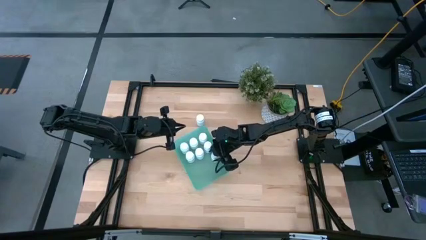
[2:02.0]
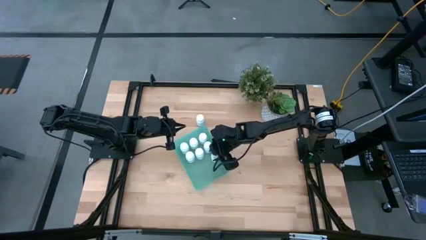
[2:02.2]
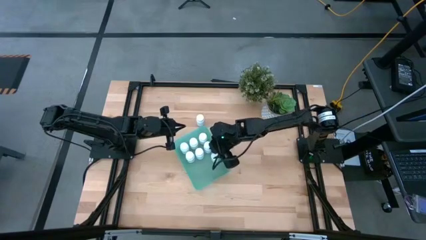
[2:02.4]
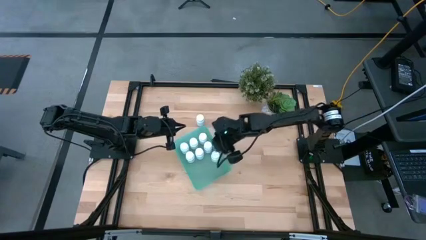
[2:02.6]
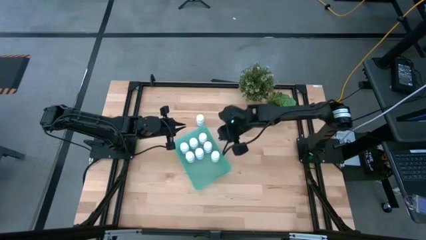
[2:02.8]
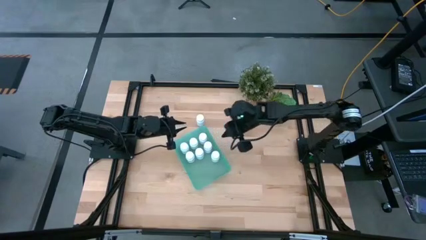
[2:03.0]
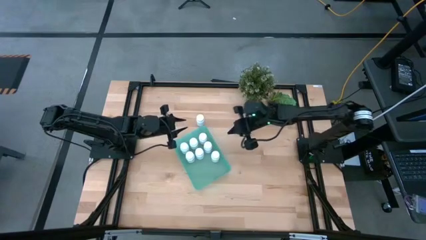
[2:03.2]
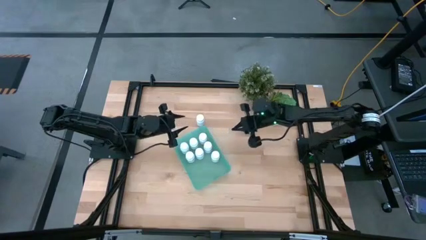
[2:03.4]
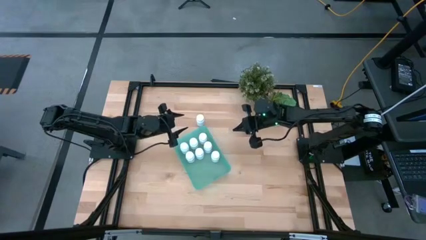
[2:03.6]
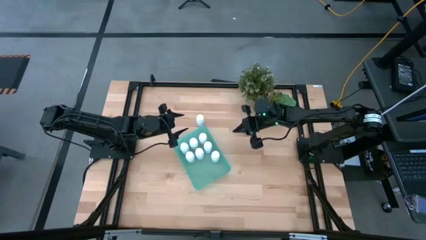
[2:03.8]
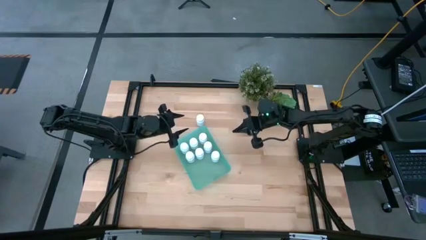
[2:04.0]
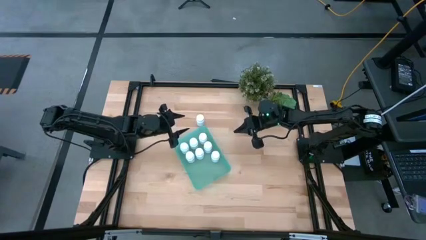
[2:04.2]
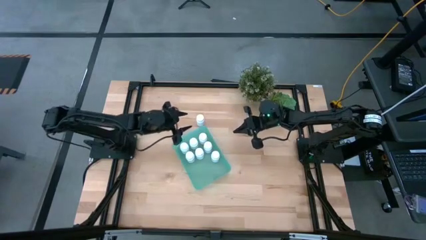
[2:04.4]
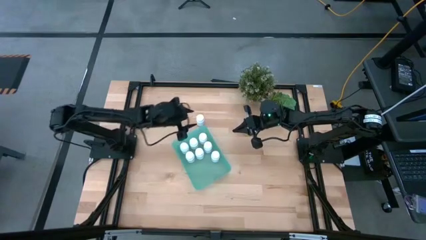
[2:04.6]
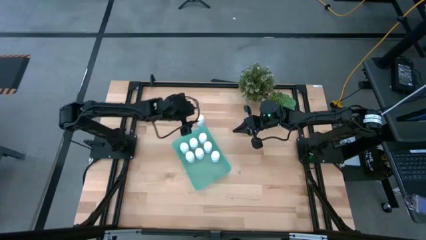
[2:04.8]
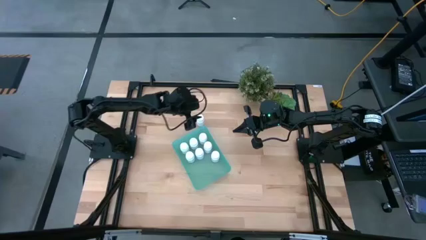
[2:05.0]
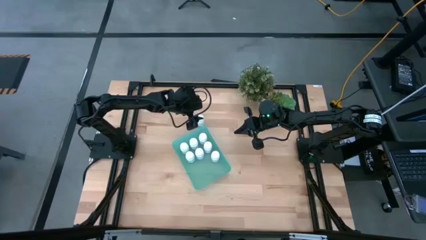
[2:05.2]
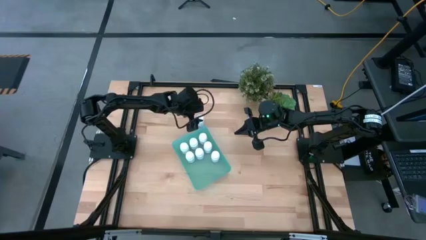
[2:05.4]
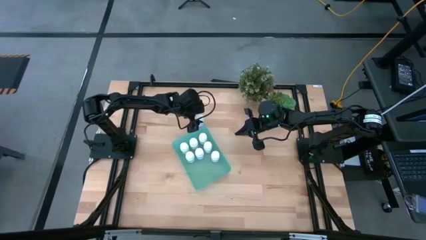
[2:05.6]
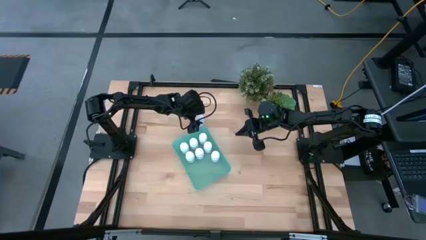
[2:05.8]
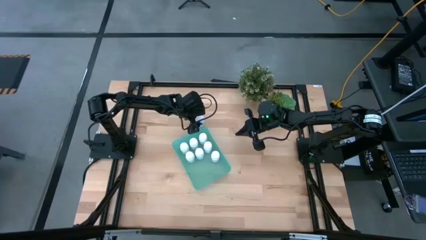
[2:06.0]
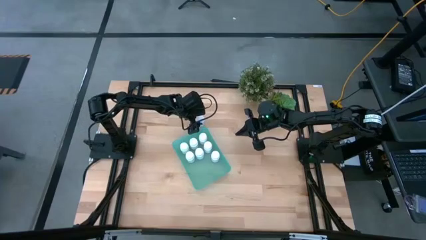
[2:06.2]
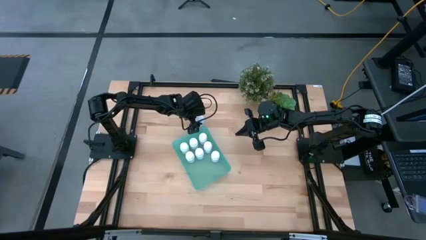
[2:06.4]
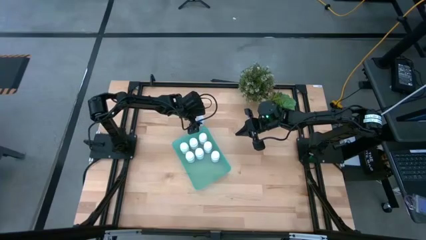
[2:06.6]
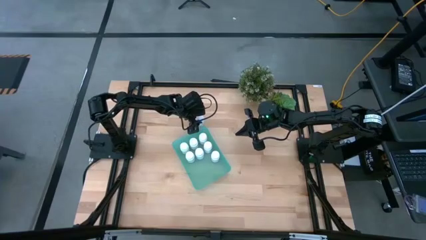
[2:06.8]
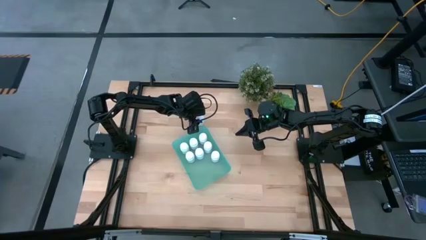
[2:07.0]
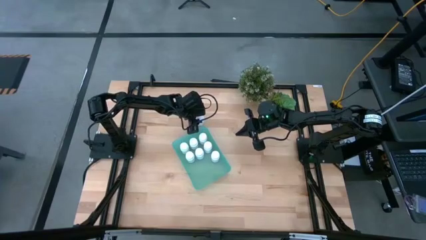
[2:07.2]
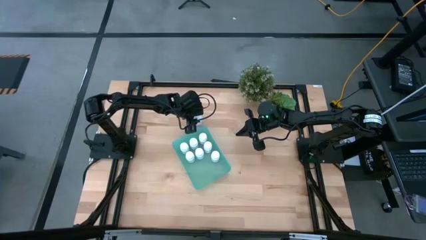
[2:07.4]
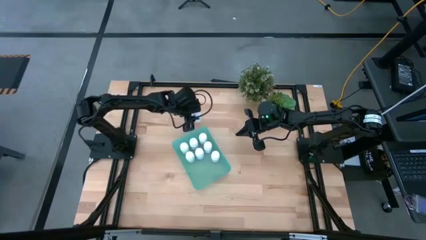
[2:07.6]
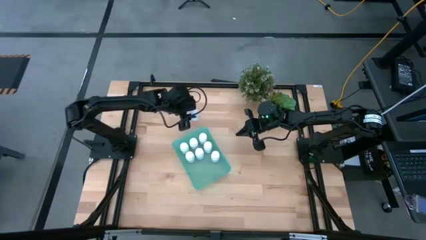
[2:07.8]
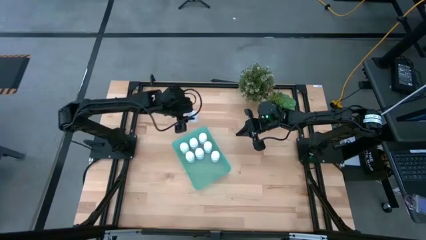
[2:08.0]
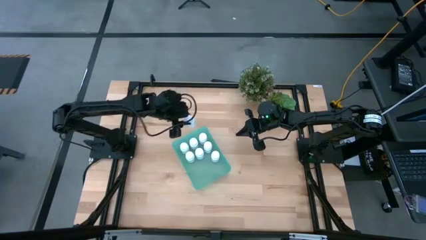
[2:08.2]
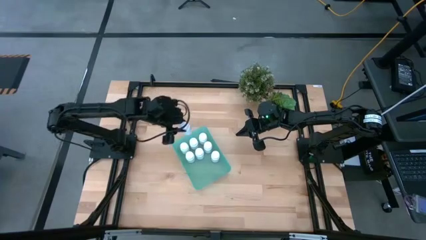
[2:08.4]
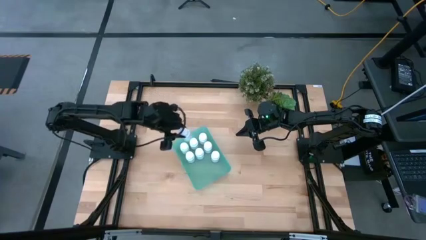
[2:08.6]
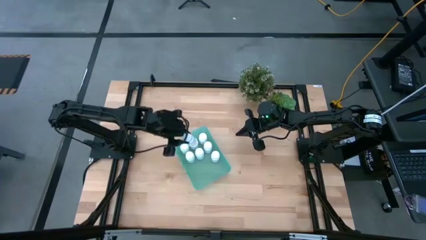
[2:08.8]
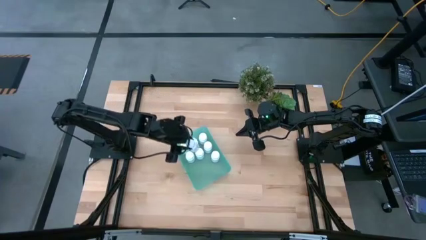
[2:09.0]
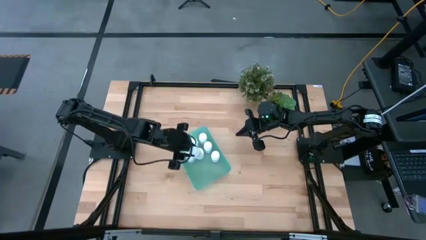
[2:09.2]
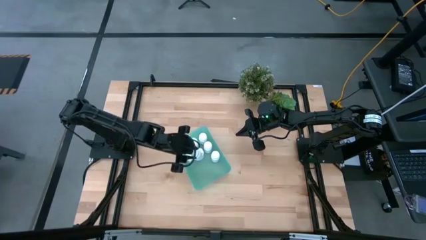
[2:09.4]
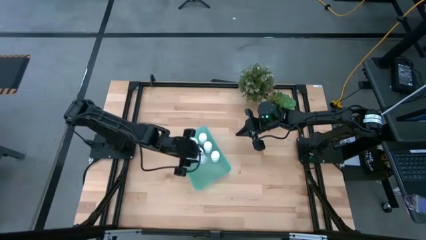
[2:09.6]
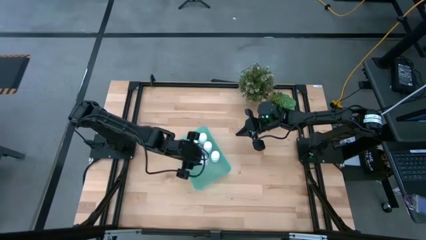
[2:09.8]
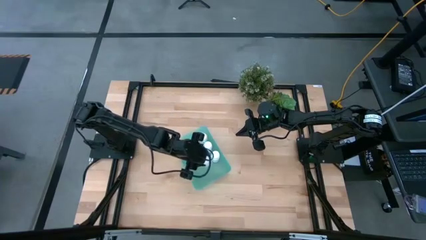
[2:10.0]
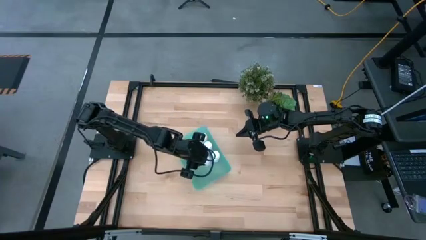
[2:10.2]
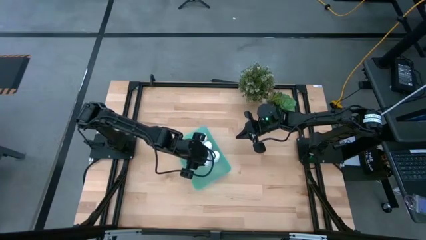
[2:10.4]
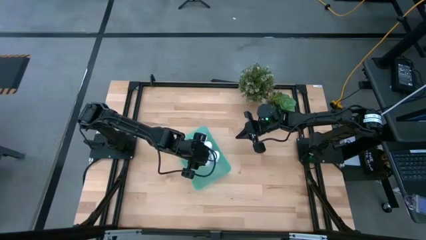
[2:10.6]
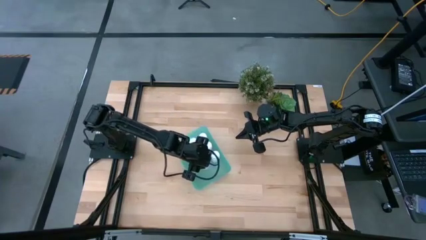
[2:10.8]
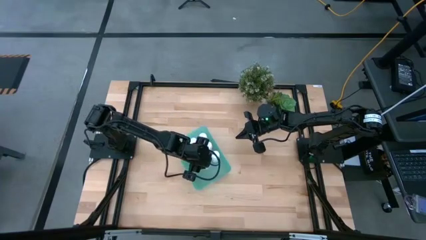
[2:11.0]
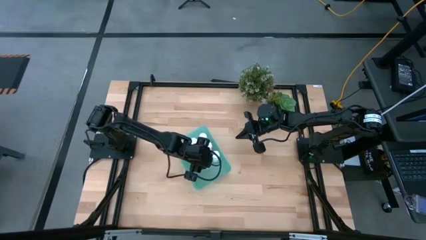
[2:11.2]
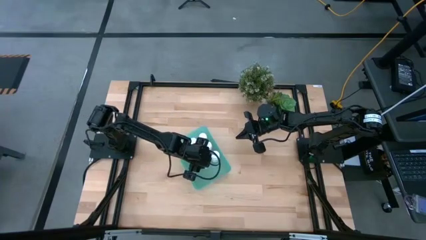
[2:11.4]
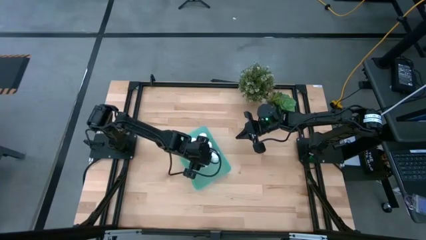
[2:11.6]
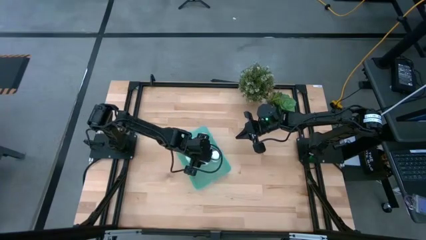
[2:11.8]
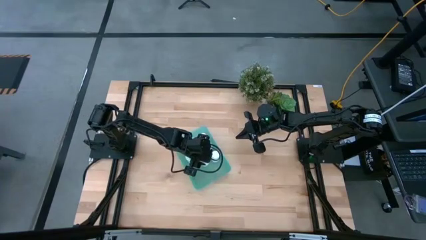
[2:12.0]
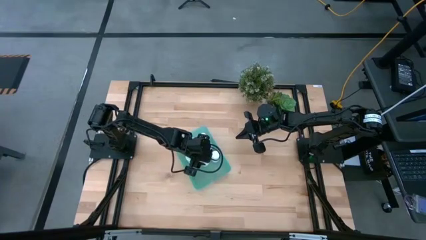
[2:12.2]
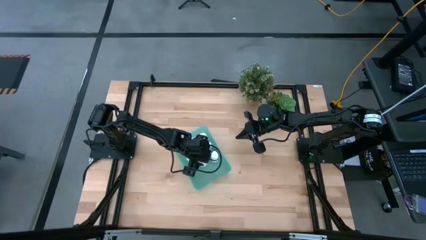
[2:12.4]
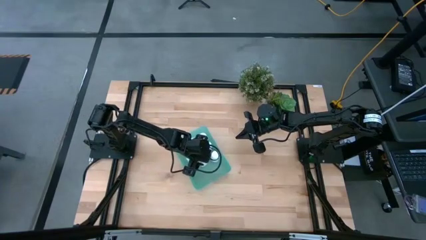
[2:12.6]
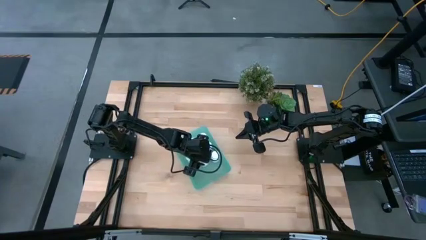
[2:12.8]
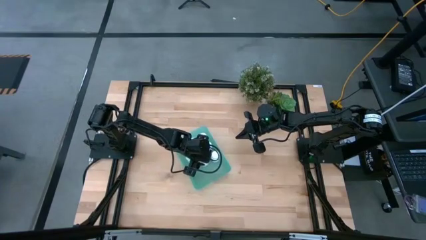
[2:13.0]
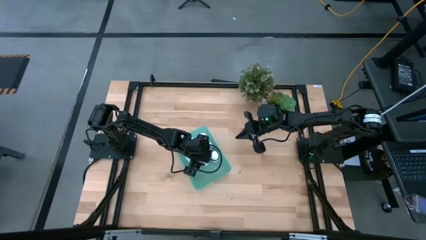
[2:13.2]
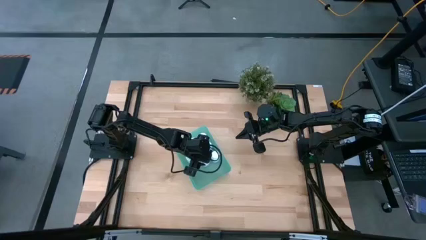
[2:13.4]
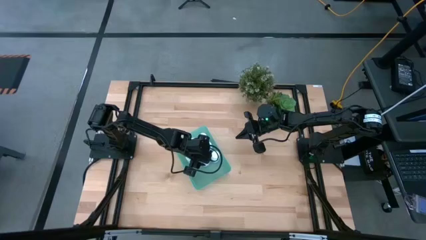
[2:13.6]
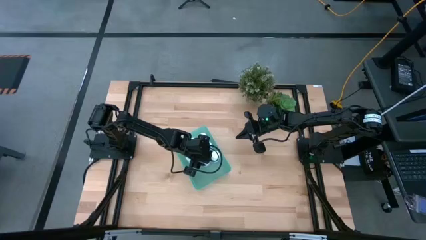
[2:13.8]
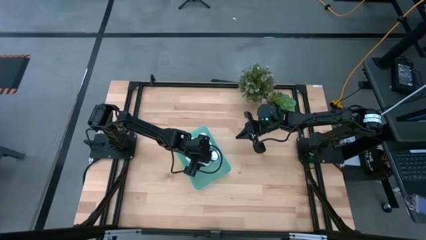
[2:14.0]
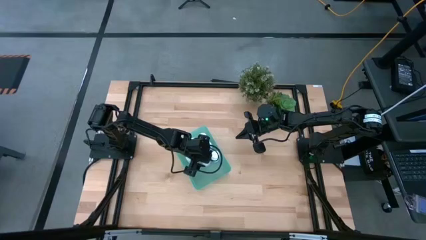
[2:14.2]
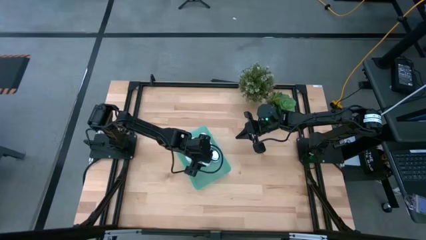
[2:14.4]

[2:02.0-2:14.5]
Task: Pick and place pill bottles into a basket
Put the white medicine bottle into the green bin

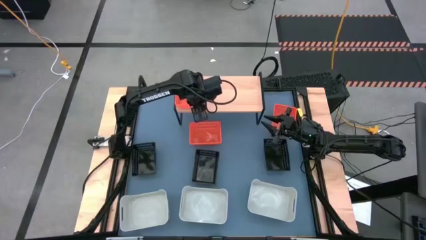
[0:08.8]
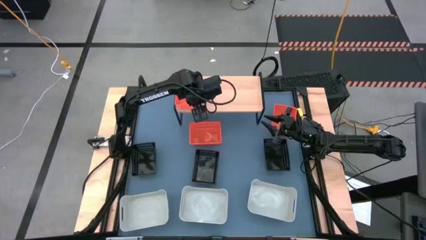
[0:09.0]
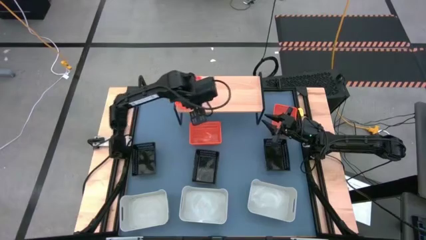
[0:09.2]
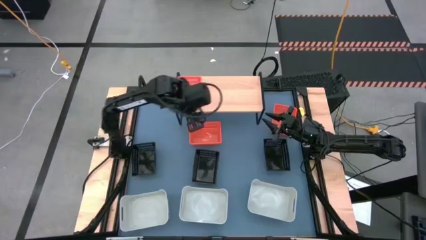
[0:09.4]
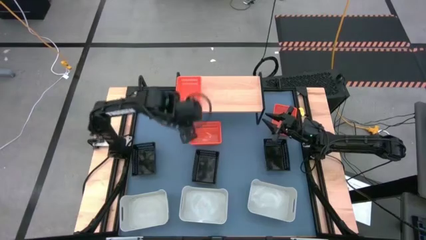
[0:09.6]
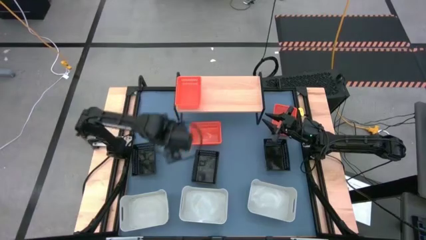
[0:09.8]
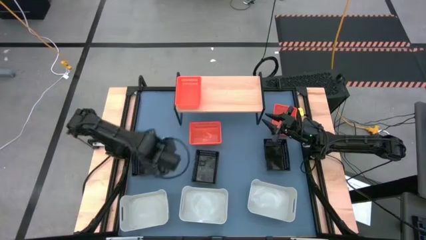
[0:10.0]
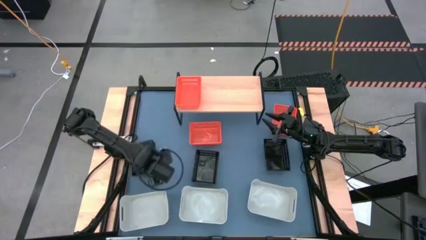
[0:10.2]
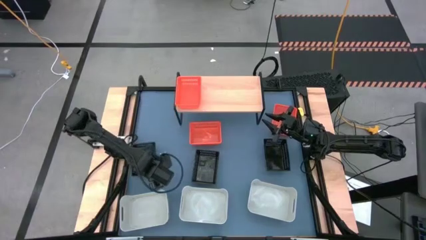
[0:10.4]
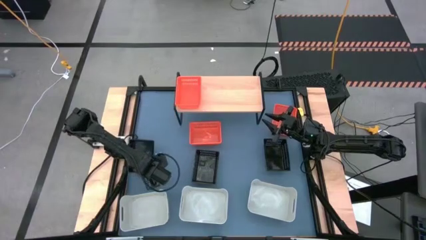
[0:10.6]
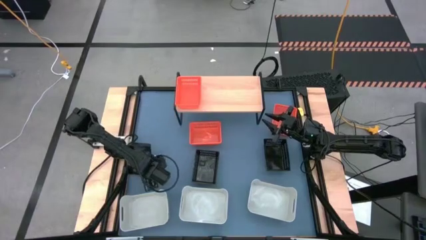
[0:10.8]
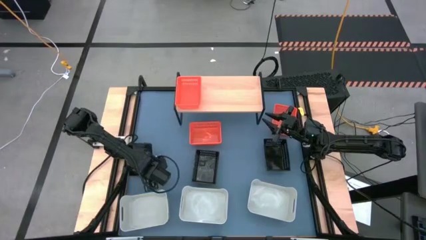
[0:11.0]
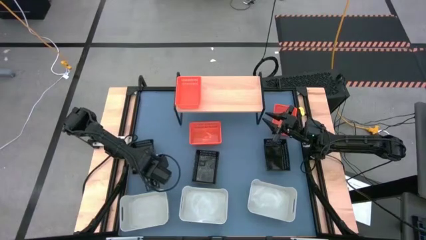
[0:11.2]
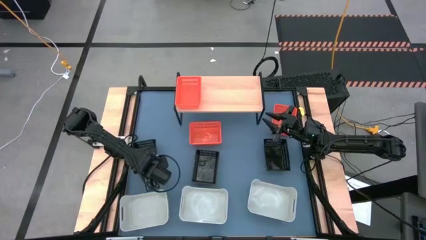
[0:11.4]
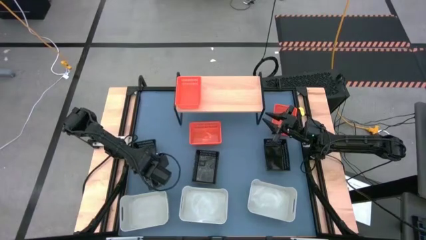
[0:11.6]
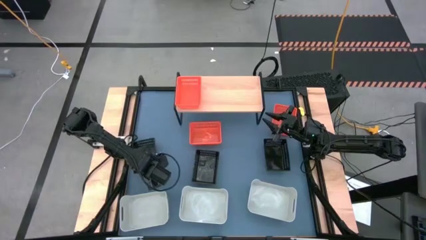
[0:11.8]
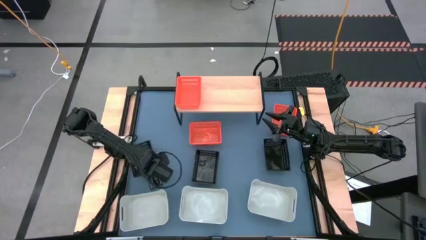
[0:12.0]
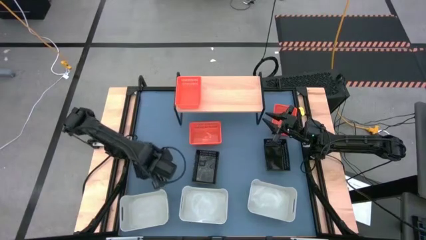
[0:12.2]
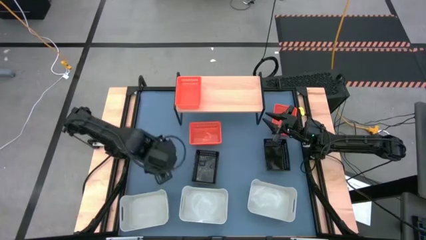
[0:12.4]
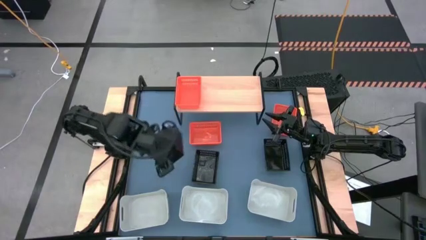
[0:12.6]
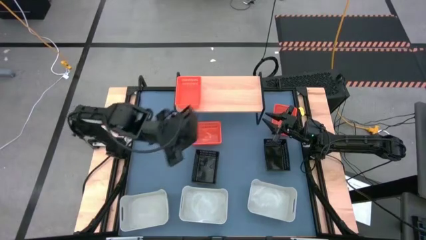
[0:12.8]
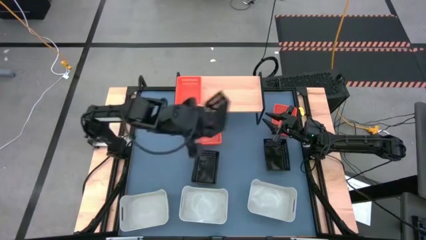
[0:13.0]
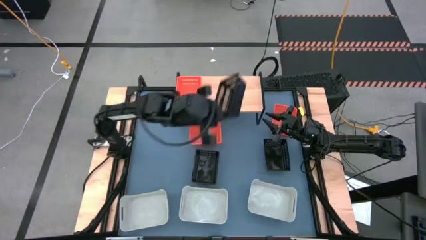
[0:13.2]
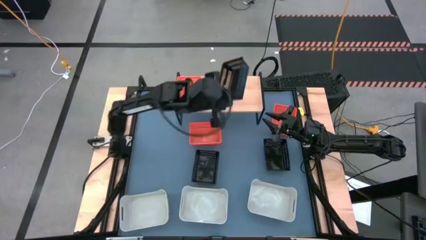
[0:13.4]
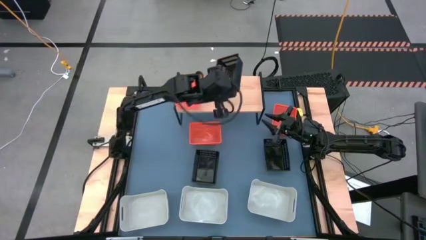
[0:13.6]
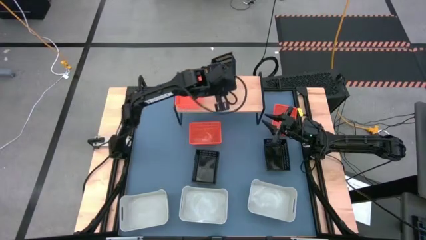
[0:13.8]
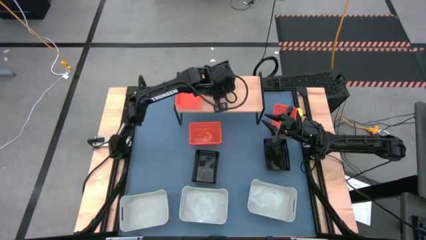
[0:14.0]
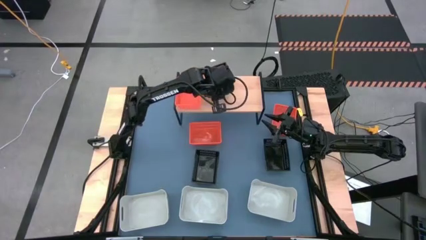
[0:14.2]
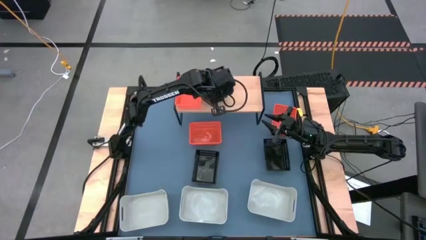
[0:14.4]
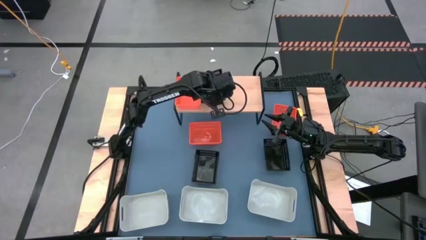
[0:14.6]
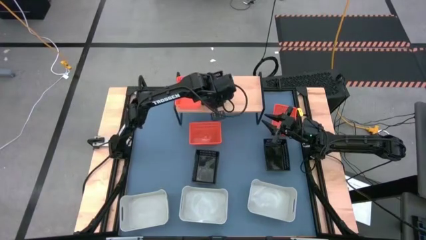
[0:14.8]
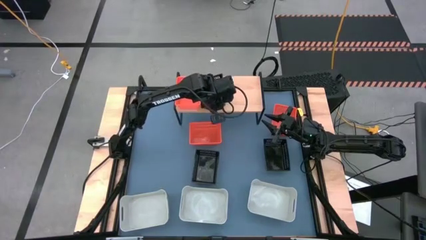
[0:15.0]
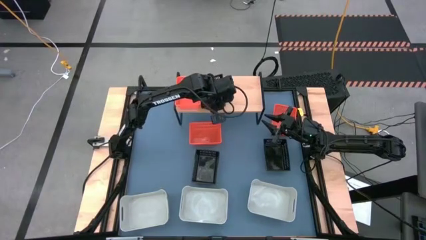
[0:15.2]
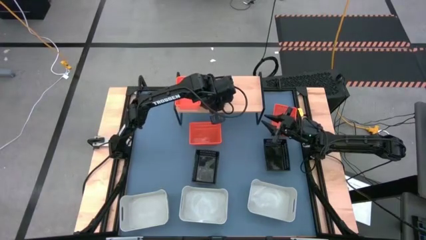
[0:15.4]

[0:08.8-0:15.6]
Task: Stack baskets on shelf by color
Put the left black bin on the shelf
